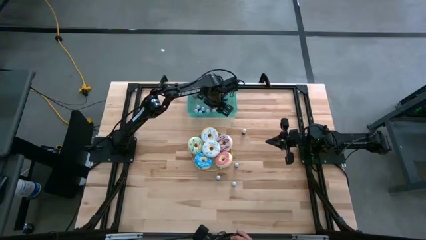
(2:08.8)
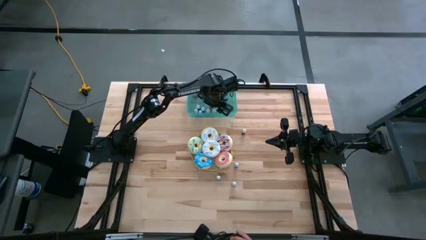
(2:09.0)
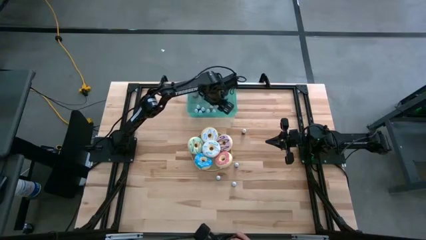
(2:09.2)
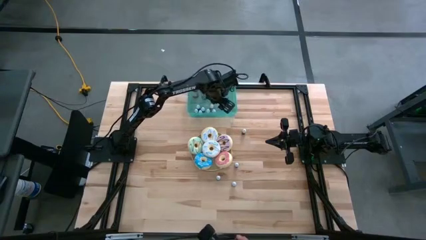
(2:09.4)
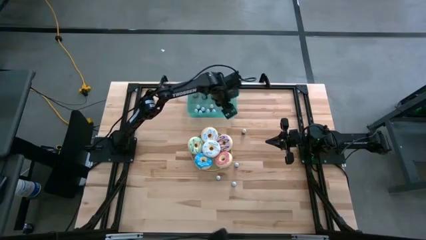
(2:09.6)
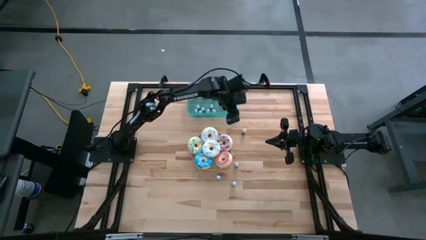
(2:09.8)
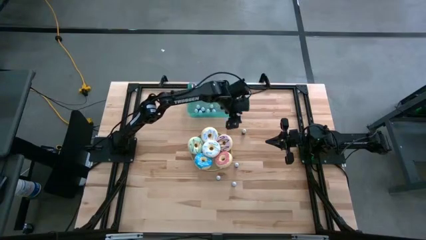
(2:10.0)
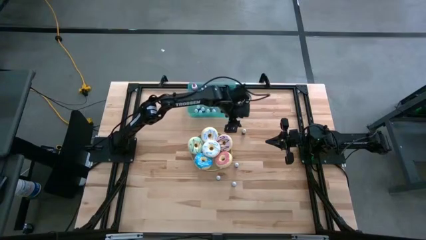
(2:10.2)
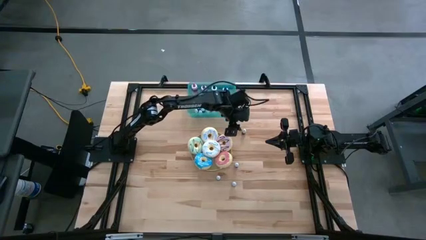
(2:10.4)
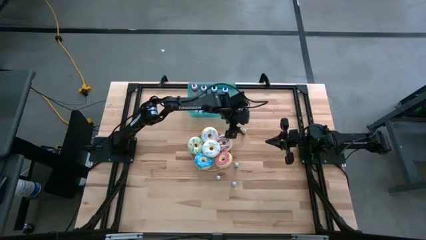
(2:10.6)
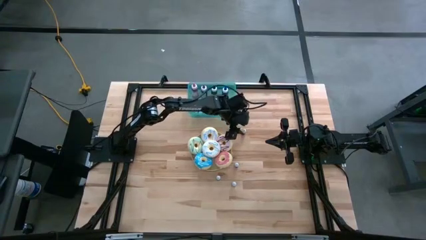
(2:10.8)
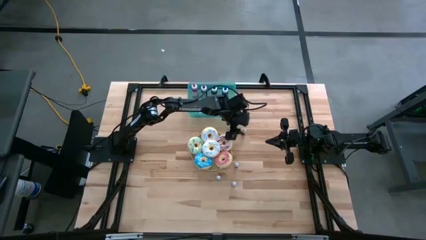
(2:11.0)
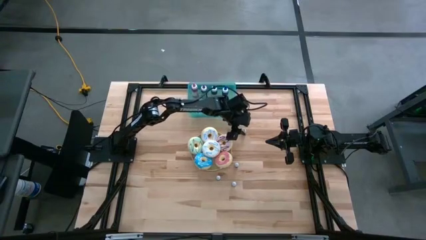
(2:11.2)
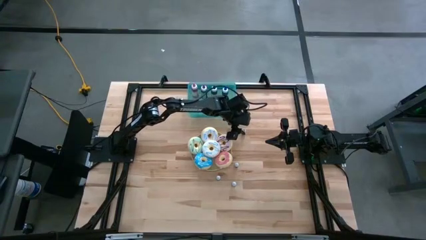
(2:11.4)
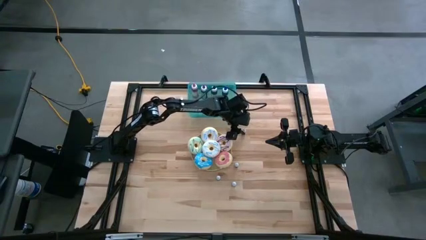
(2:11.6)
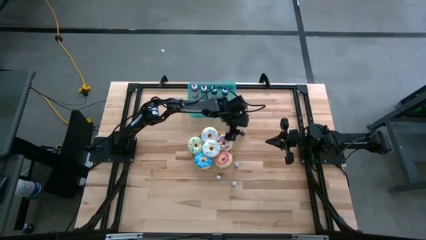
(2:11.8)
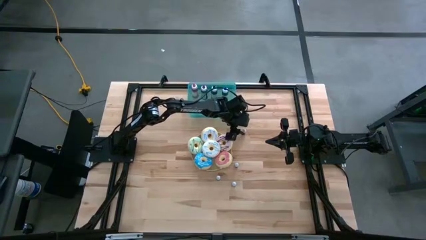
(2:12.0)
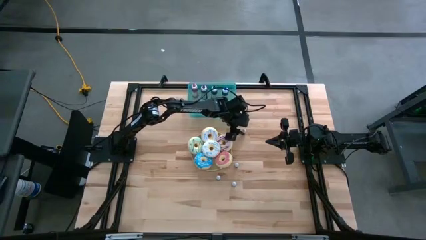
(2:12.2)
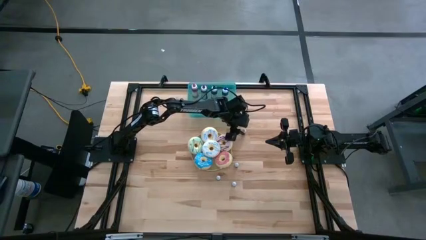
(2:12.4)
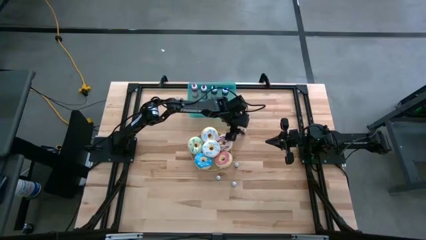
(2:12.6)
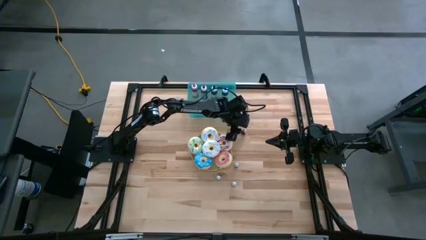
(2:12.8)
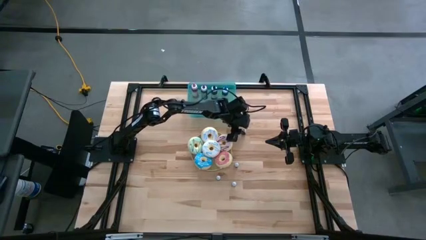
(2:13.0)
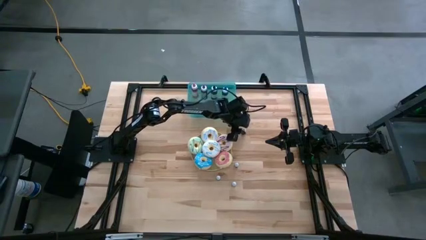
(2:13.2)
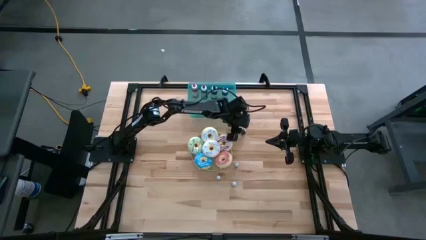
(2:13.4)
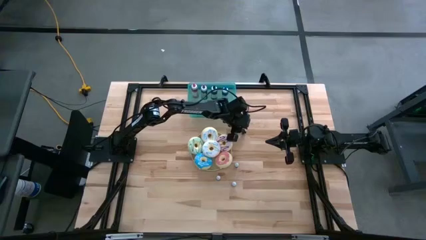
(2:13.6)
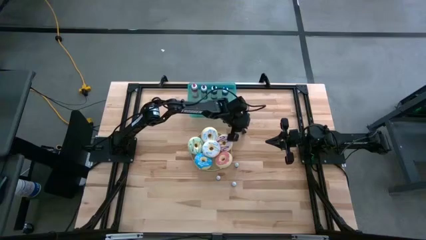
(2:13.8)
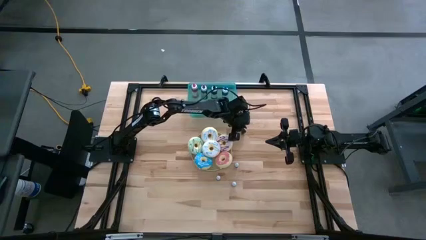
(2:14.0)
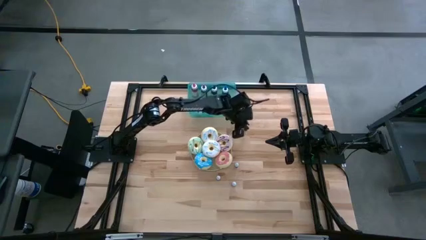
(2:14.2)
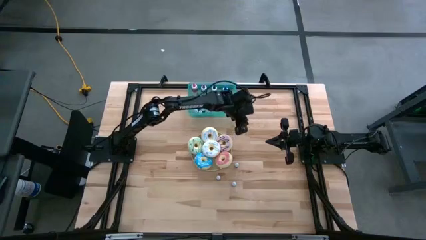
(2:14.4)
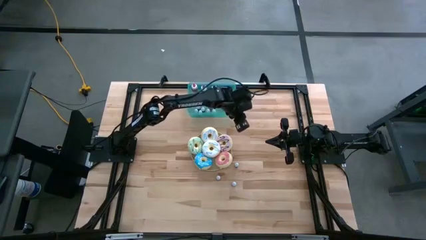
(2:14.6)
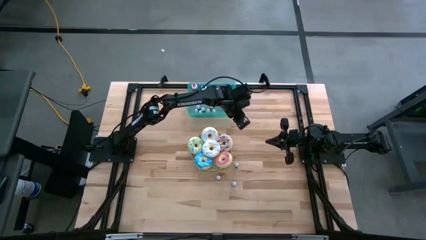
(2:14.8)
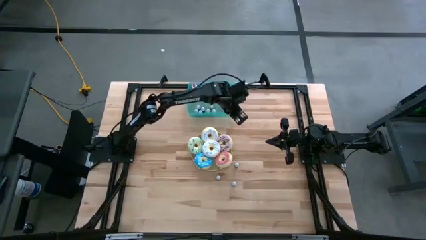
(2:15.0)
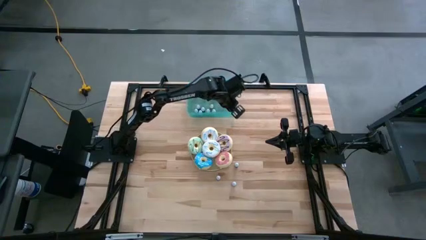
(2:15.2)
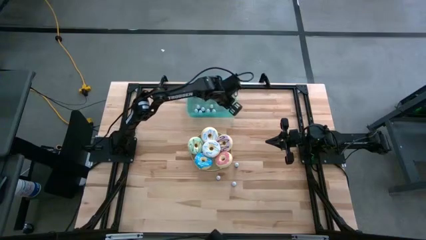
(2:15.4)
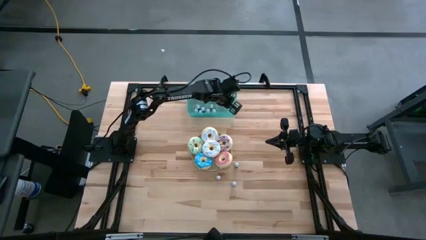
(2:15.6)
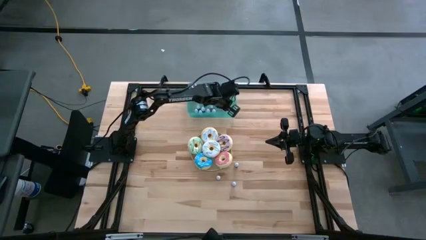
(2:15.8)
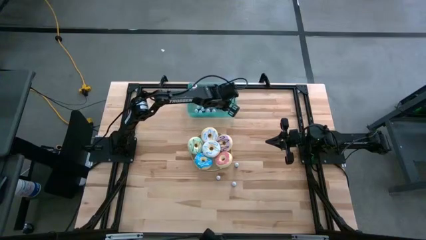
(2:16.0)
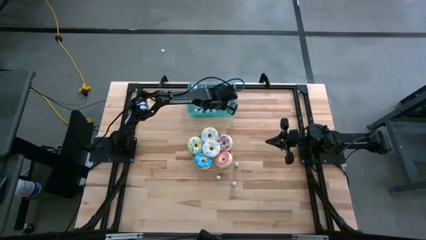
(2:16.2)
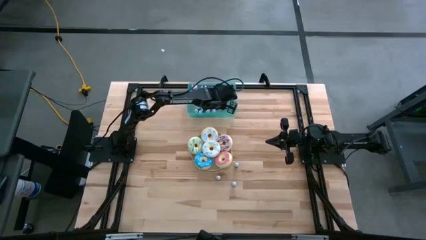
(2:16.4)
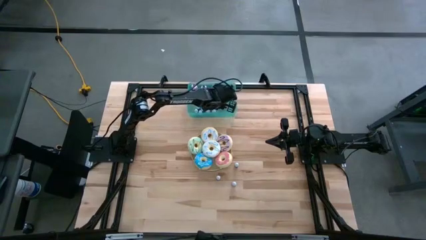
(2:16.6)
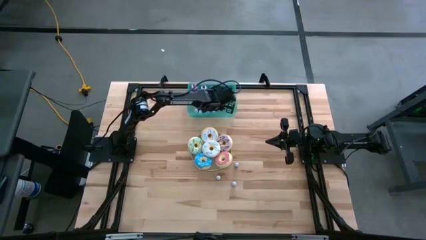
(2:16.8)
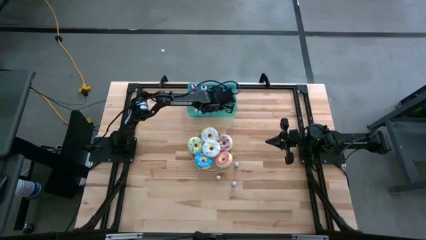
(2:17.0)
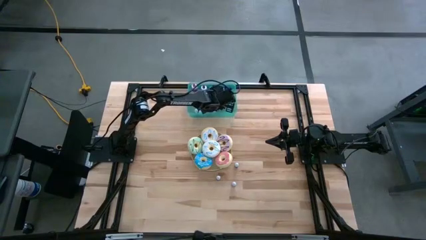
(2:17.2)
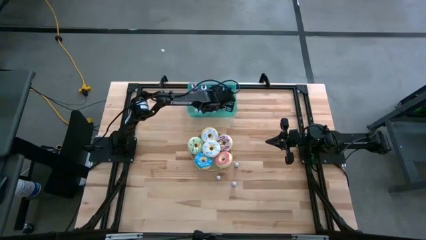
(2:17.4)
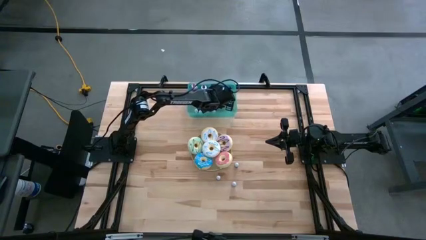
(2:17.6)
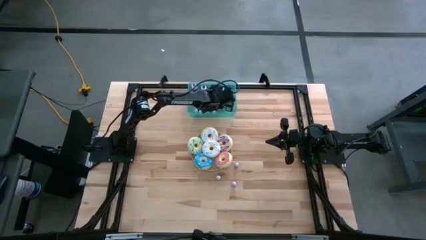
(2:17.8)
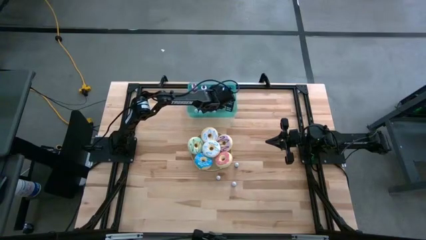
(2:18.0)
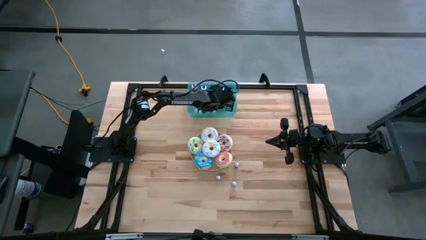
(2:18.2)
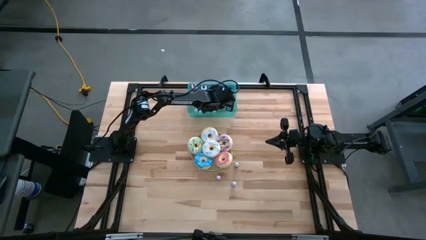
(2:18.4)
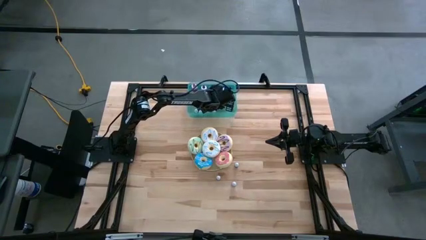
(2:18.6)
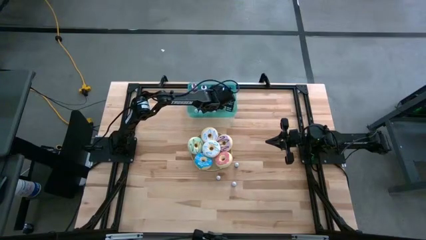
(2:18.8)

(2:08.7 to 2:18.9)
Task: Pick & Place food coloring
Put the small green food coloring bottle into the green container

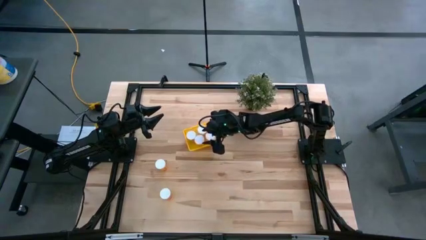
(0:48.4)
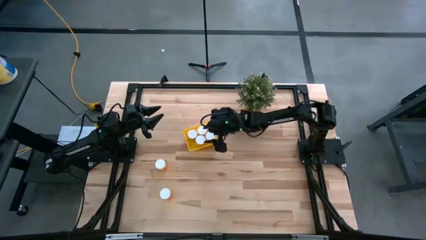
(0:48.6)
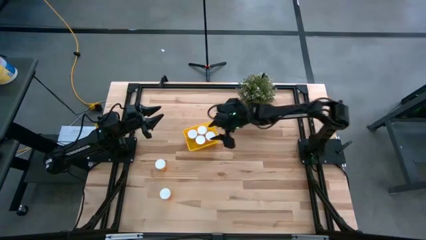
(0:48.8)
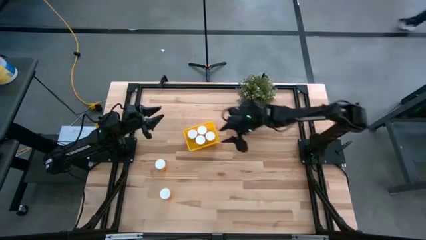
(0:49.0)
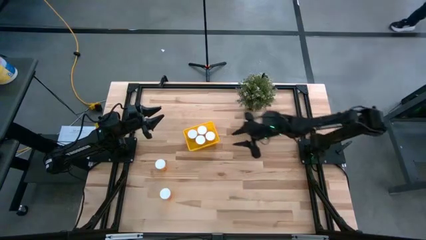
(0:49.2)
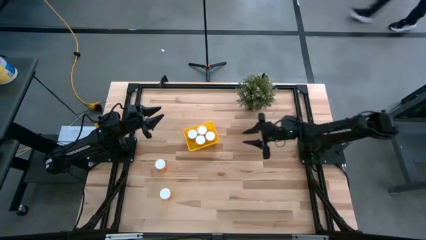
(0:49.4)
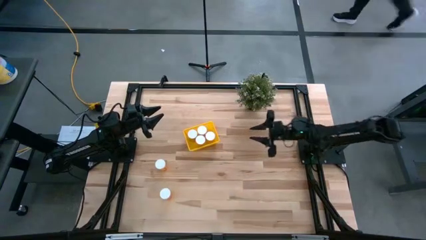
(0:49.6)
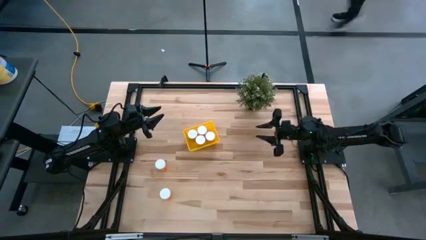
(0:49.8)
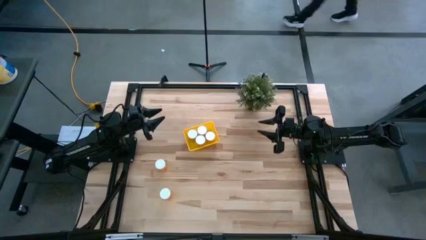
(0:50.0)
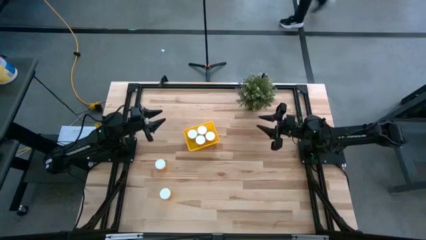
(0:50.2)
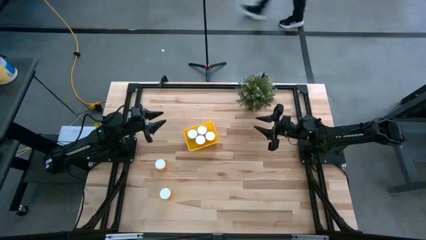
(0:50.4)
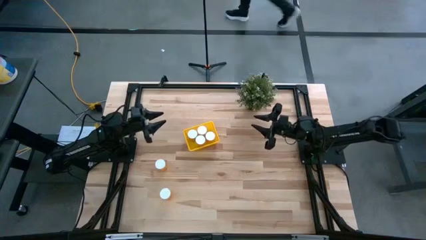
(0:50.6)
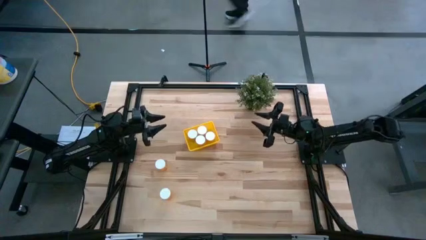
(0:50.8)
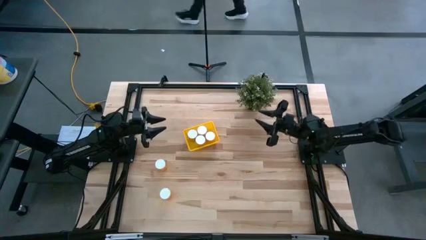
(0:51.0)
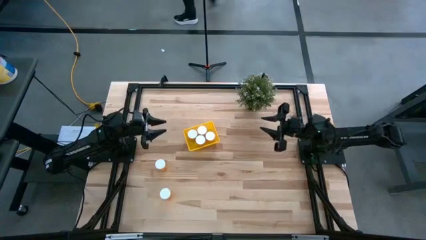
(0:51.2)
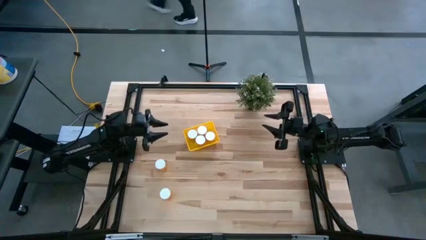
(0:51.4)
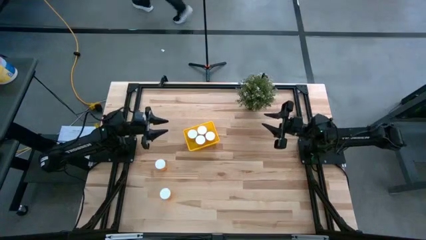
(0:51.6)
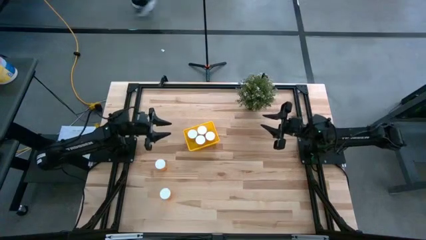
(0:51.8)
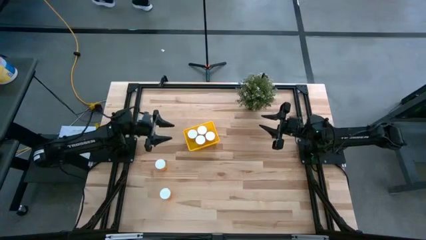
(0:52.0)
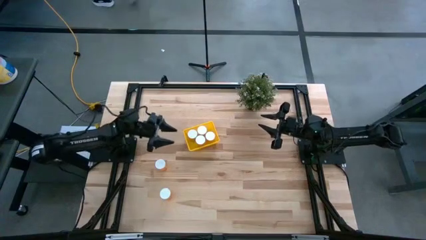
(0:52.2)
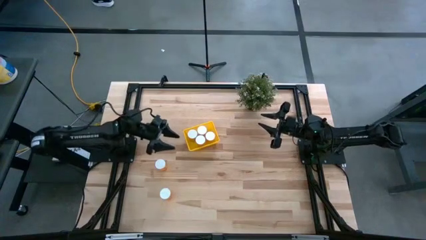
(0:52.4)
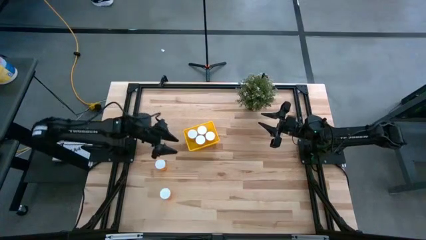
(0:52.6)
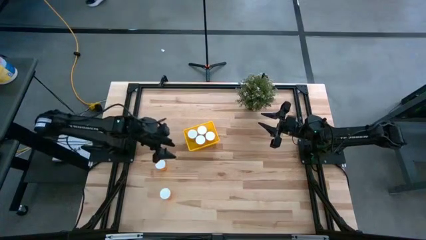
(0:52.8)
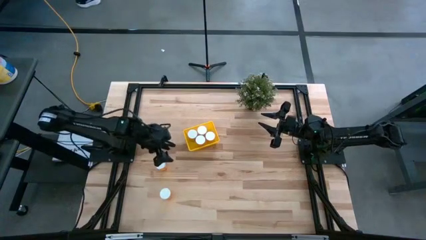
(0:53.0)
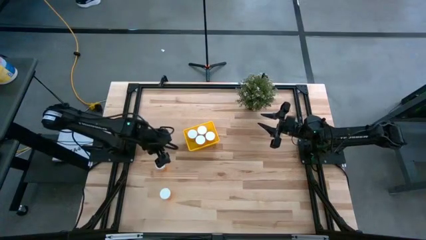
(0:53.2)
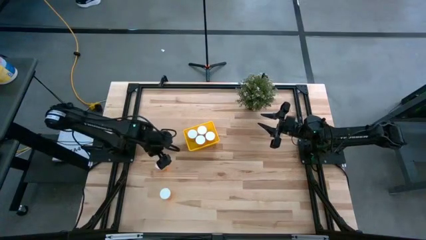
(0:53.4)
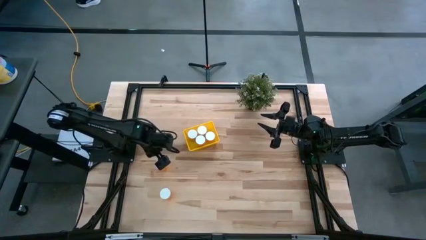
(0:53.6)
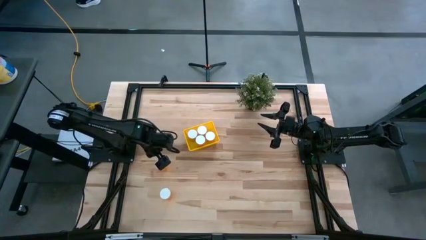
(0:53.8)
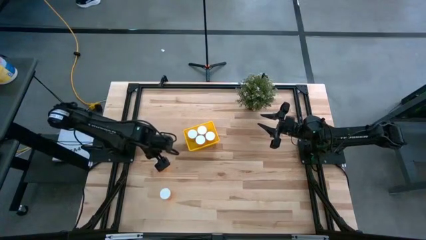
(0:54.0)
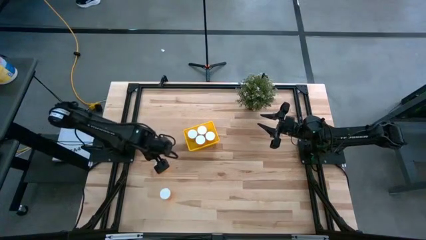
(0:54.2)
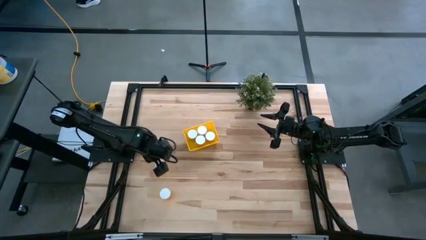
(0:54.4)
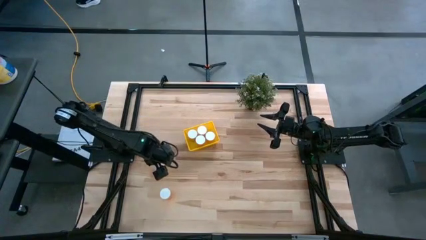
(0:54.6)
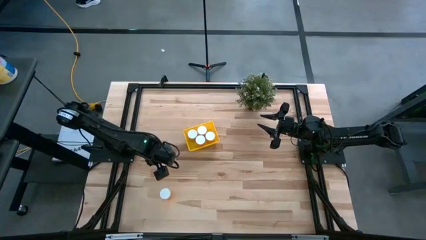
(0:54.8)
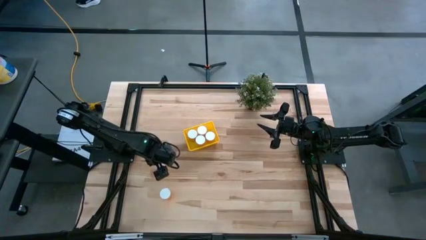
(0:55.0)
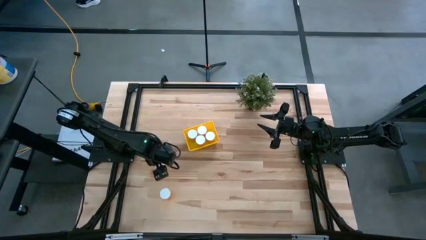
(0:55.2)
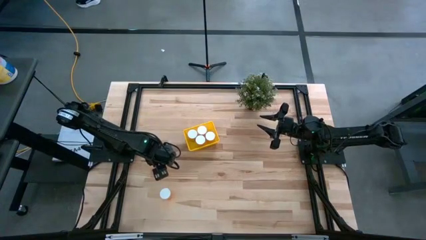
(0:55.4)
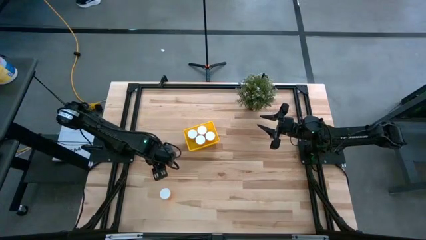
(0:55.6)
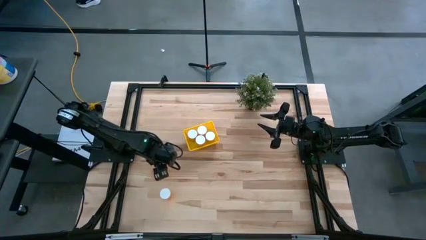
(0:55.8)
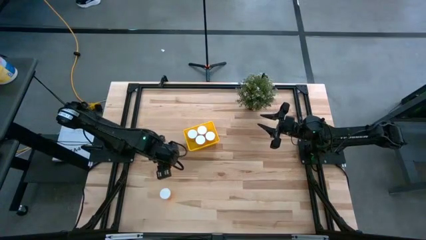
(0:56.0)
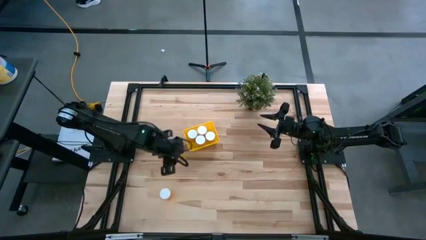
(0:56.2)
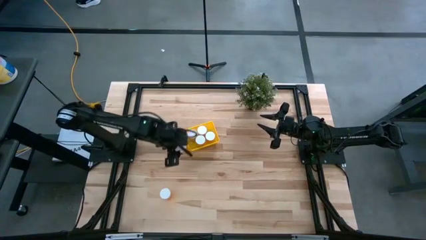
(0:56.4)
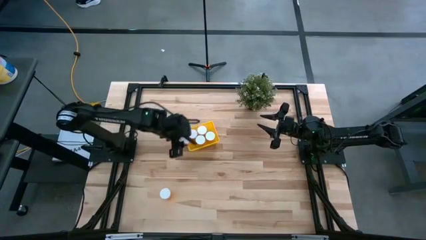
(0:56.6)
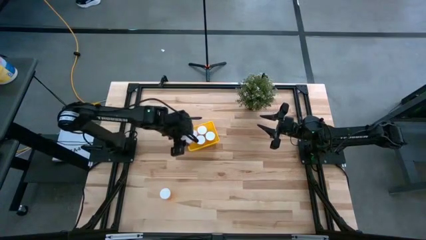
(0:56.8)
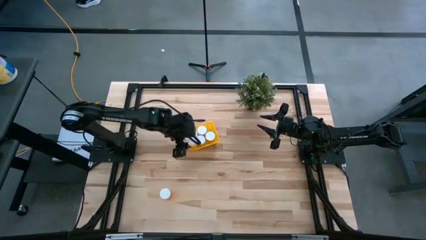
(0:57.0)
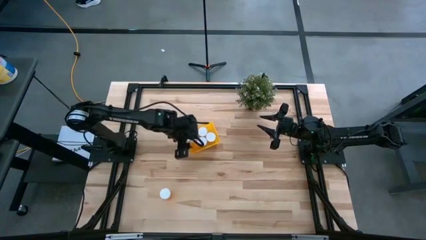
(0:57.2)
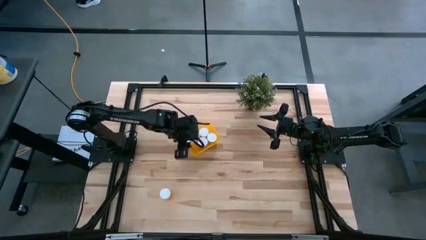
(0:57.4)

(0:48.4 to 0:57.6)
Task: Pick and place pill bottles into a basket
Put the orange pill bottle into the yellow bin
